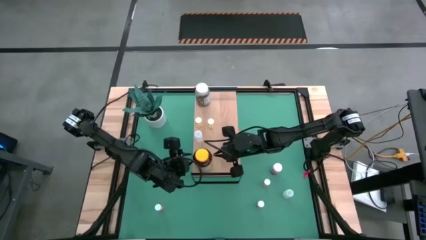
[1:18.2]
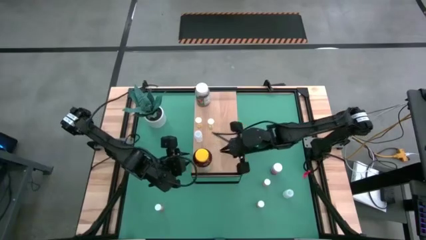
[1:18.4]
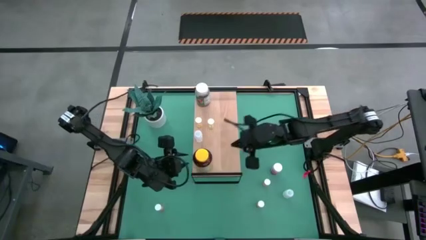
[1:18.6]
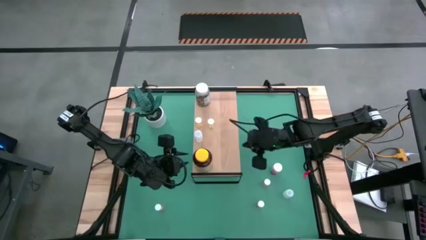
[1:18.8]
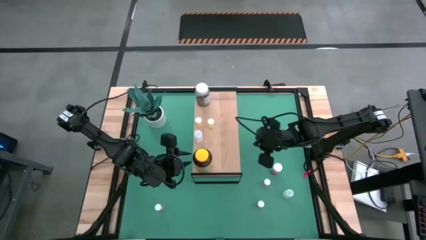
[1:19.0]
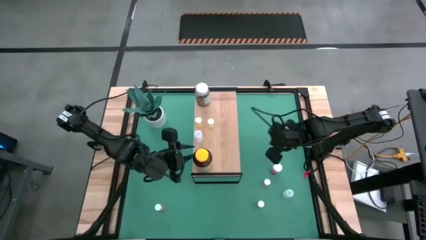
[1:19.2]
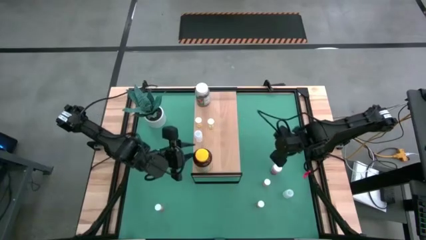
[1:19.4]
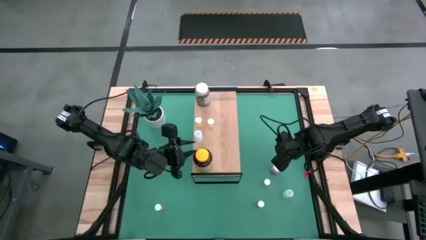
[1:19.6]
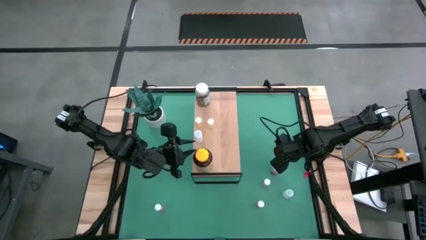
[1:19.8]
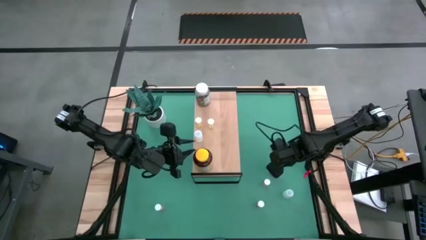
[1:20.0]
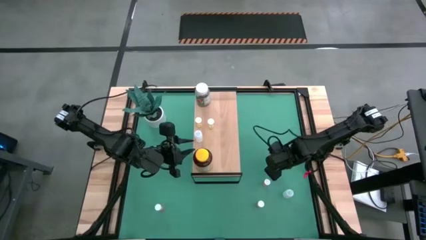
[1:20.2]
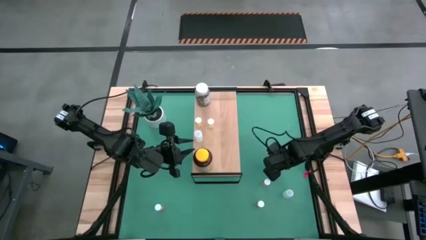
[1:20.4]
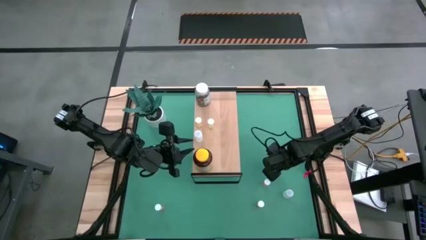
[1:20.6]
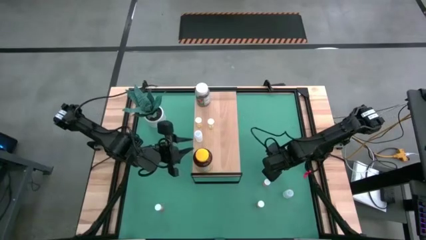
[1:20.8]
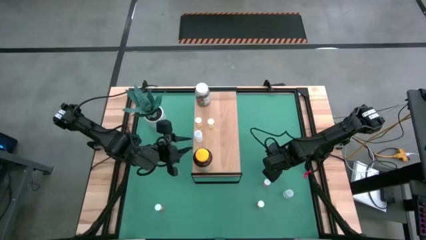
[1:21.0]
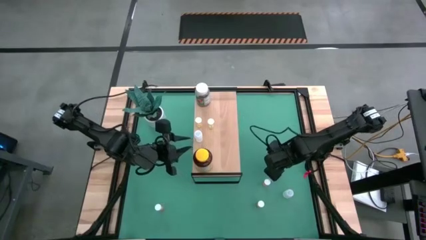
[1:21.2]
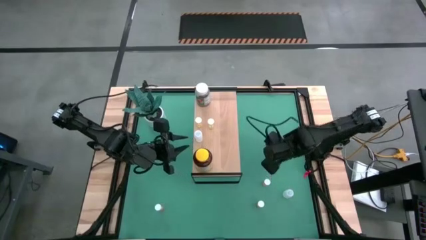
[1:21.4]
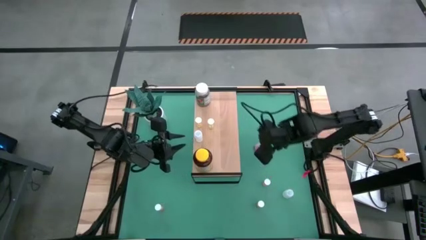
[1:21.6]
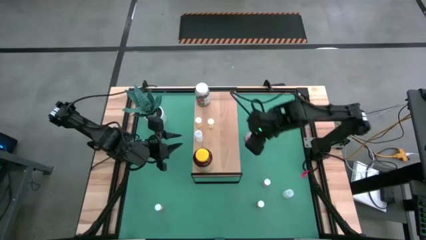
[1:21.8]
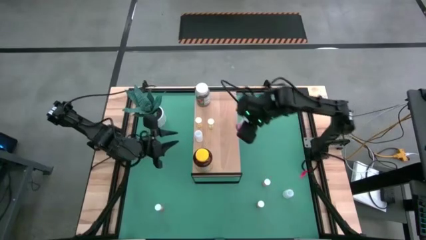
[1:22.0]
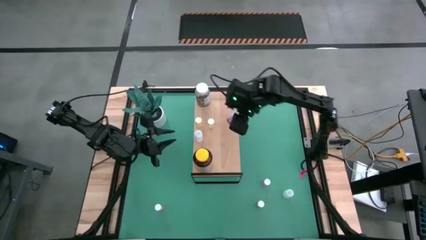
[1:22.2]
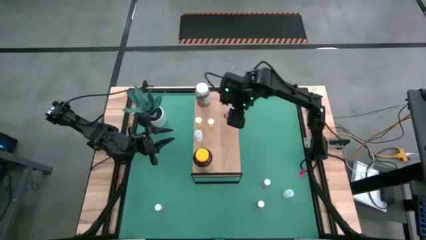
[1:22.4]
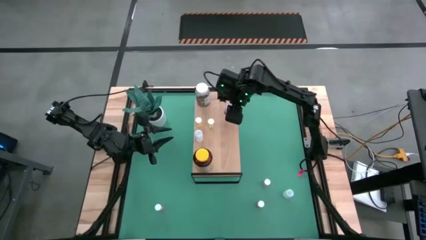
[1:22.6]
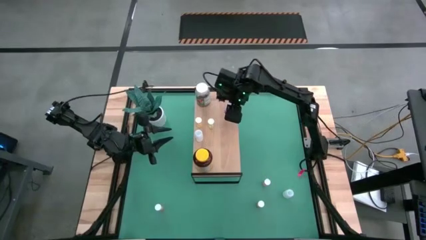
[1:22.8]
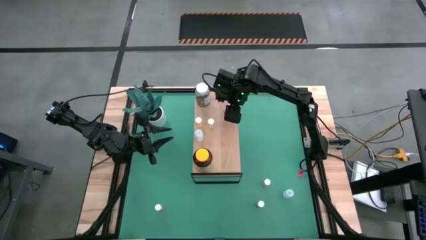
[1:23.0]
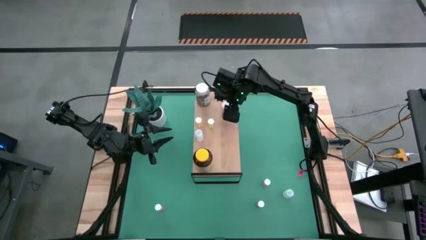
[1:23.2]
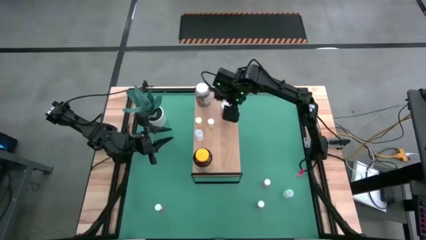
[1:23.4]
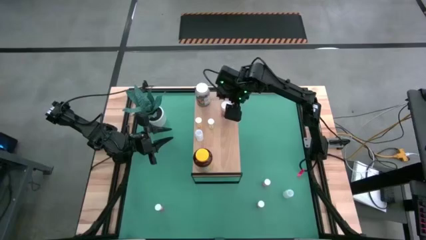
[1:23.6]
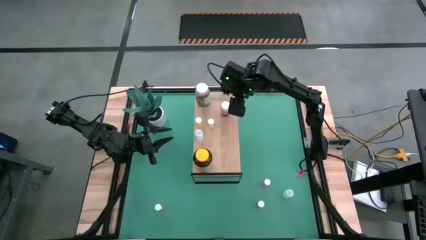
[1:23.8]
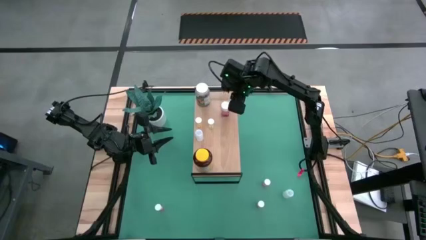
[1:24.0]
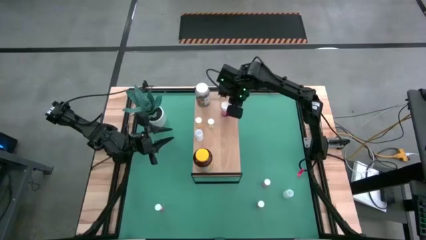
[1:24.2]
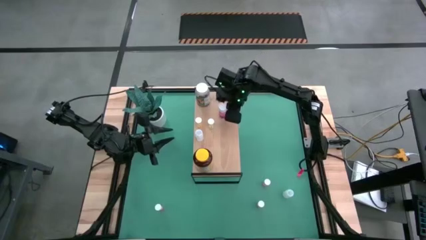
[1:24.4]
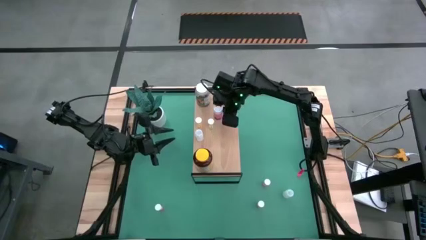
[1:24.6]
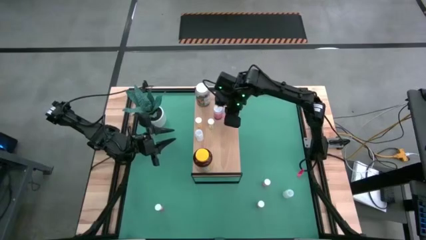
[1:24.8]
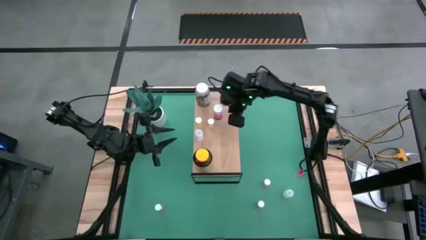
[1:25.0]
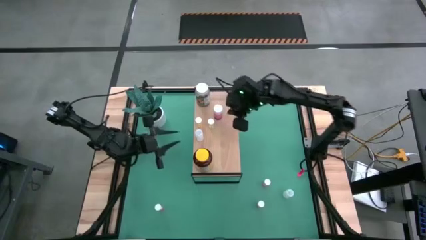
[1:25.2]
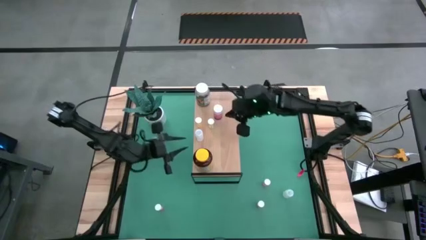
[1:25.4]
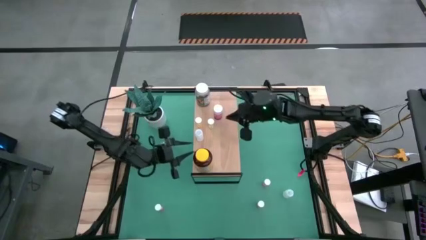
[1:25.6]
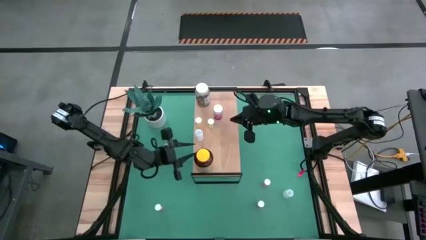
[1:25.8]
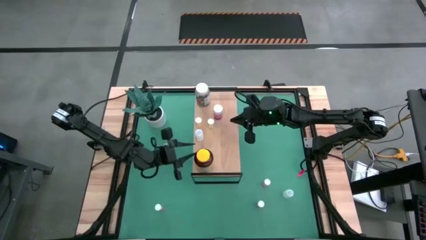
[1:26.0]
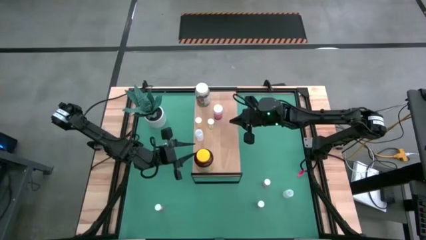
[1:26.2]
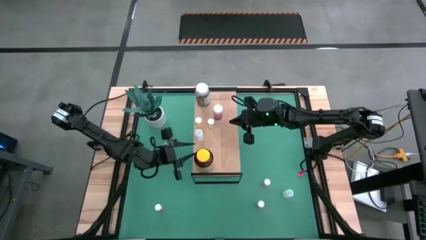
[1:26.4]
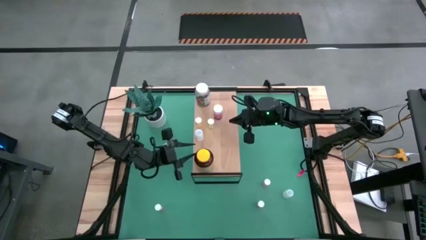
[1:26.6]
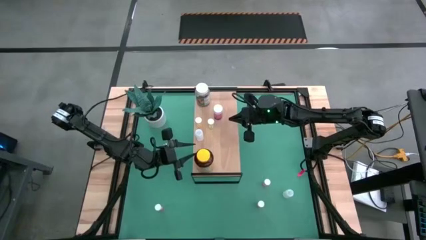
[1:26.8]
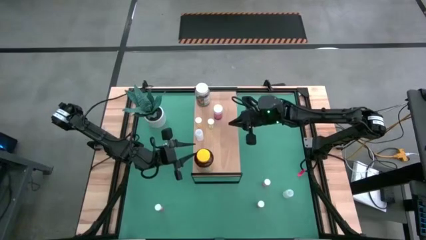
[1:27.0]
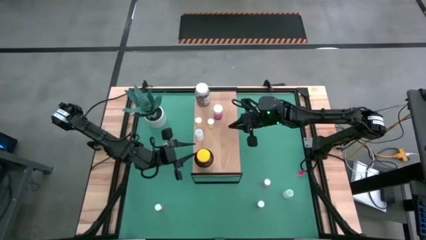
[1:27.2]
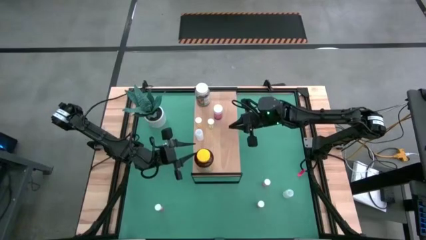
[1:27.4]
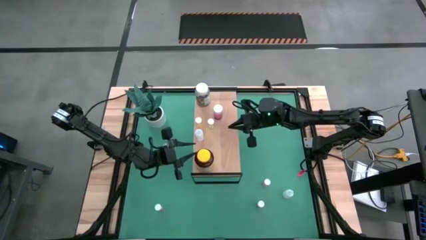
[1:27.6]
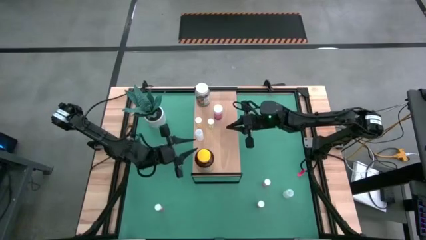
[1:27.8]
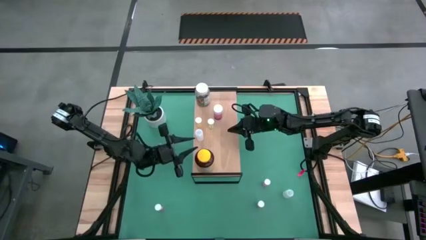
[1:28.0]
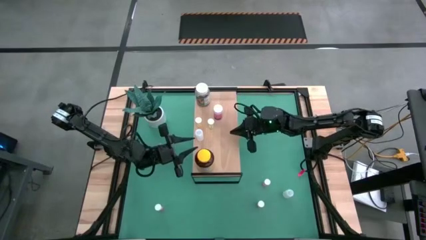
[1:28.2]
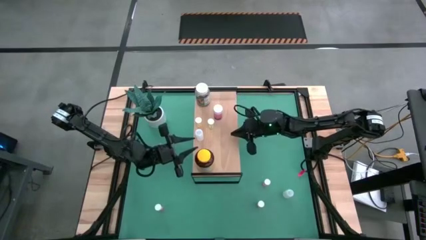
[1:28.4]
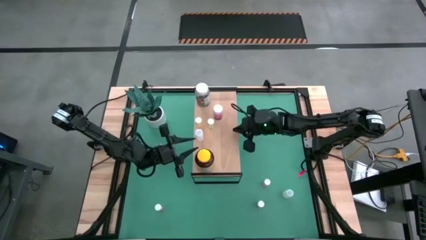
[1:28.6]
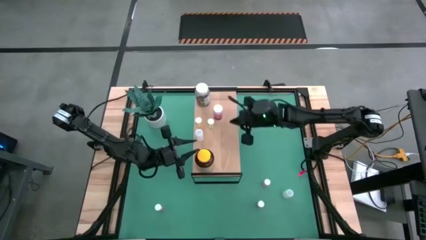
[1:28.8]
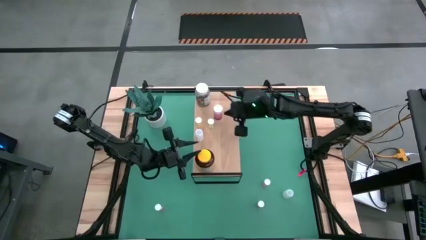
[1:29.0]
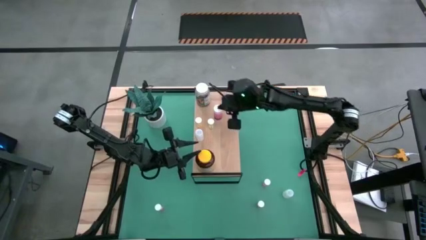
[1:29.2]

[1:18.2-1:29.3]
Task: Pick and place medicine bottles onto shelf by color
Put the pink pill bottle on the shelf

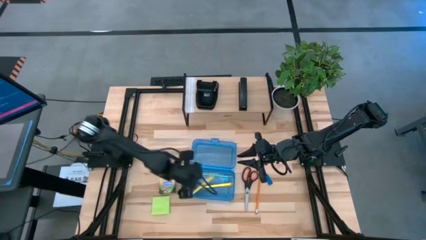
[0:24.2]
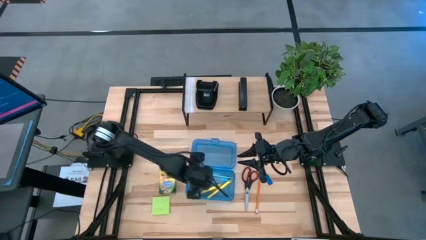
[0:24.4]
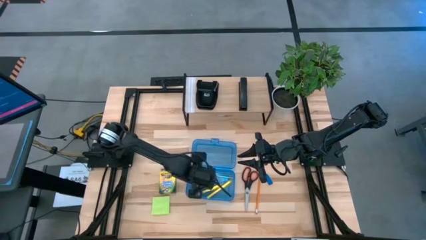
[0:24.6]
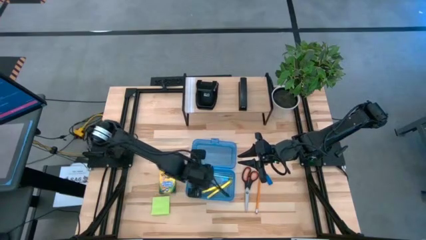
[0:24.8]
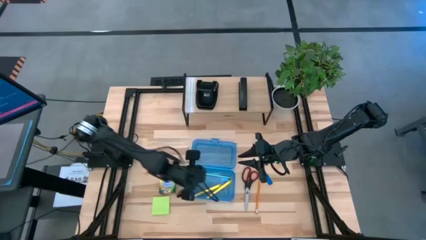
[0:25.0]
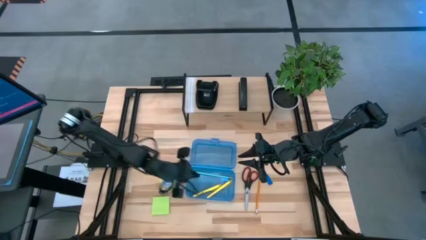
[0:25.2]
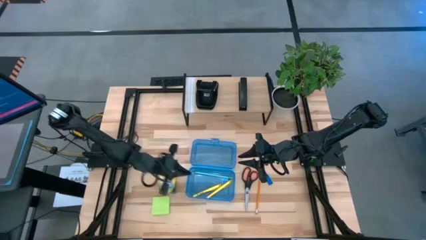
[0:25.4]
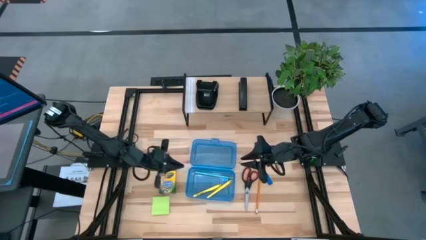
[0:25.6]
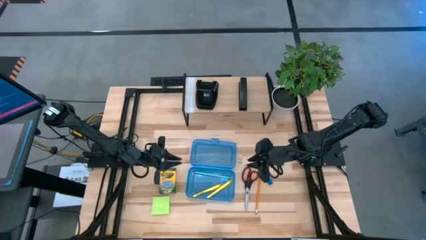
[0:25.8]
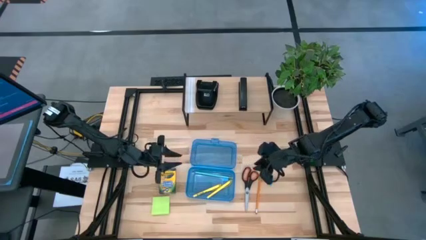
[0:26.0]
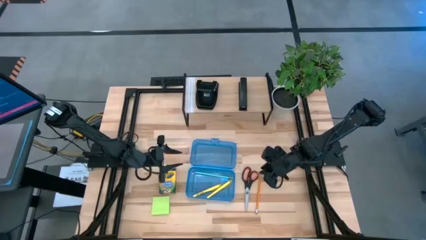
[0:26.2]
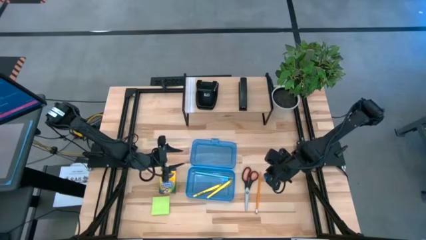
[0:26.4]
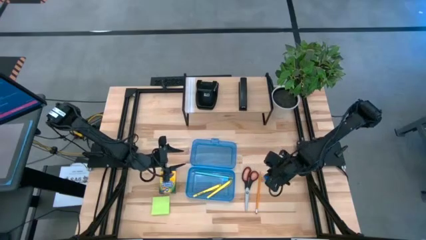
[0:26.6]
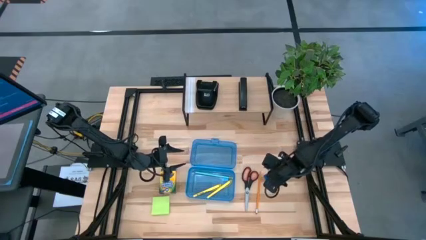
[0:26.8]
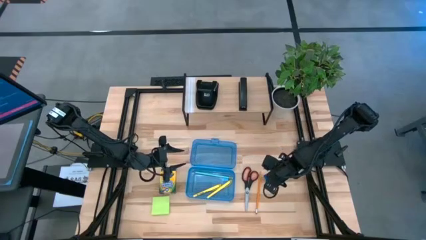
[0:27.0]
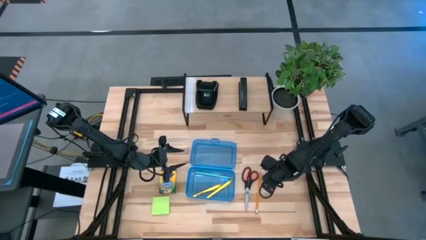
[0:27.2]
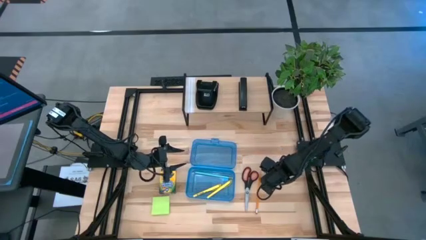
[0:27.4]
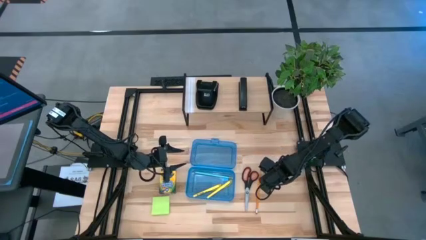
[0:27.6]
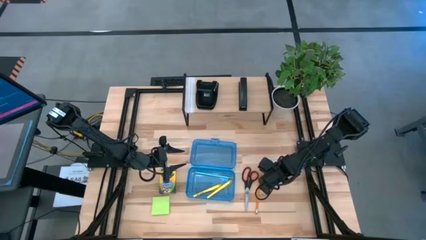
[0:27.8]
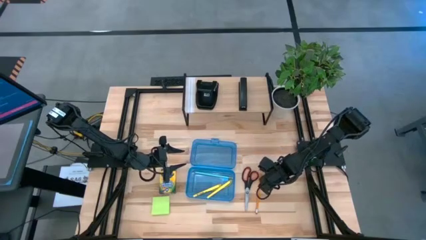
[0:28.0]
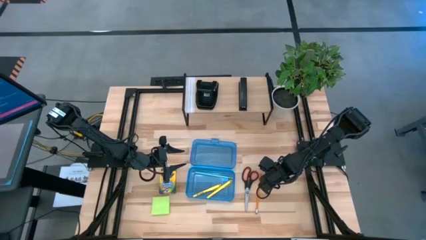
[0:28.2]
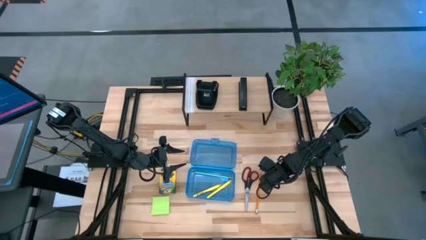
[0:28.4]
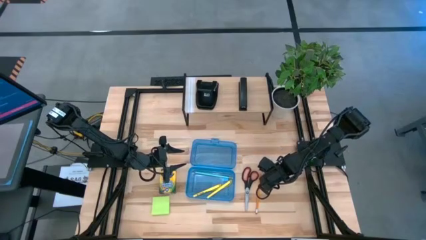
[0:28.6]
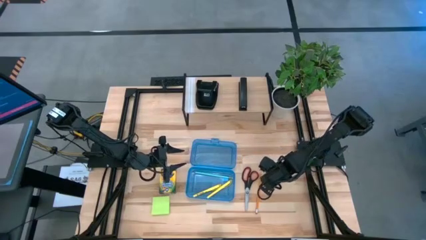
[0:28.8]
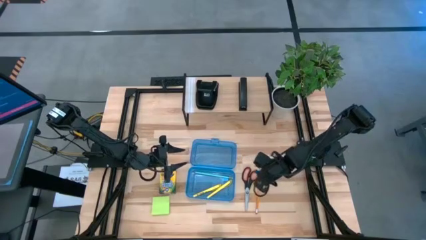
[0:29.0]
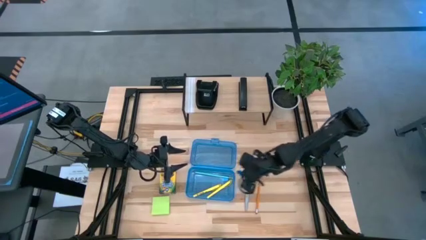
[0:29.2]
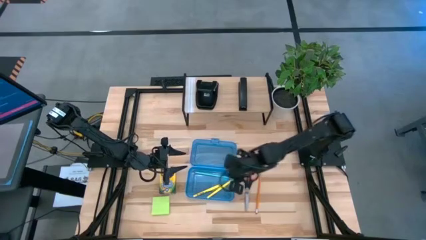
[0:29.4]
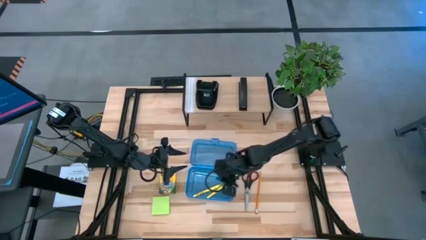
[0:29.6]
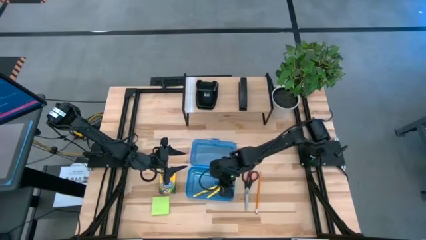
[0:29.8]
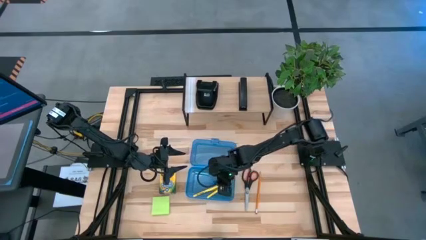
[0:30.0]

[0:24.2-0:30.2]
Task: Pack school essentials
Put the blue eraser into the blue supply box
